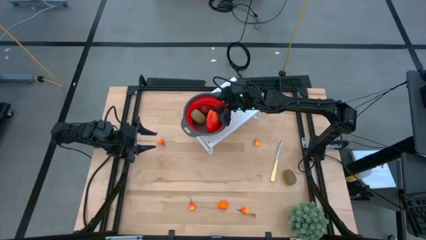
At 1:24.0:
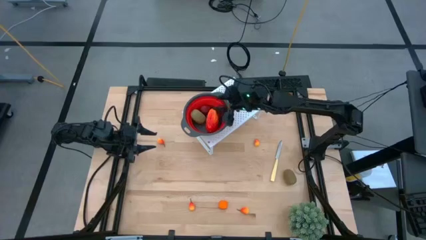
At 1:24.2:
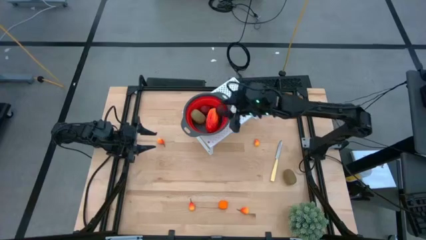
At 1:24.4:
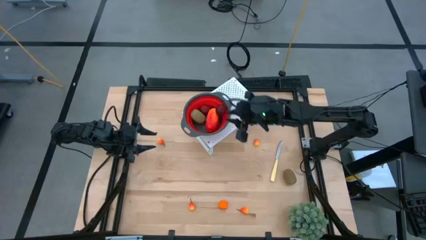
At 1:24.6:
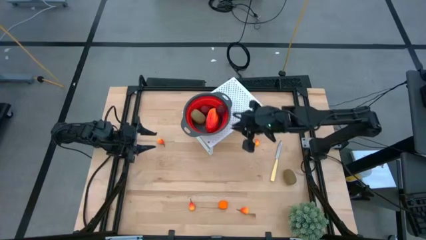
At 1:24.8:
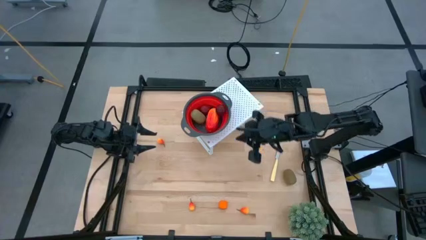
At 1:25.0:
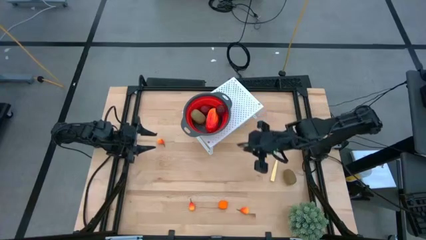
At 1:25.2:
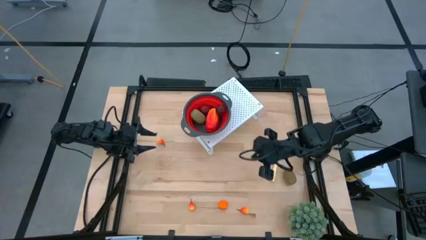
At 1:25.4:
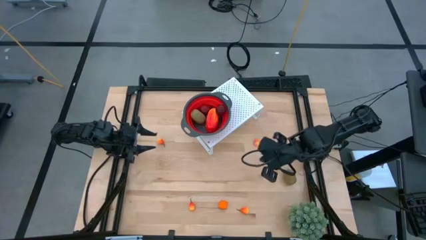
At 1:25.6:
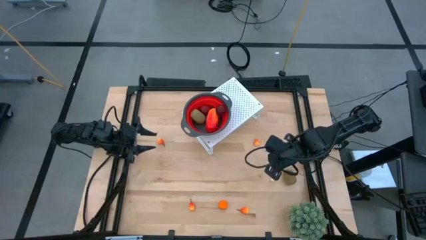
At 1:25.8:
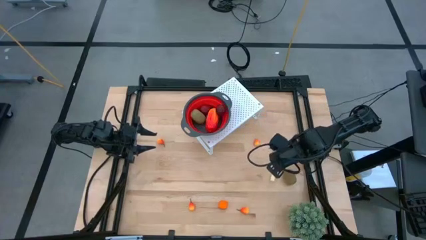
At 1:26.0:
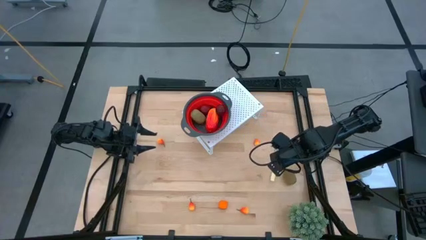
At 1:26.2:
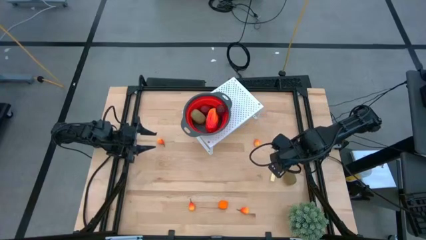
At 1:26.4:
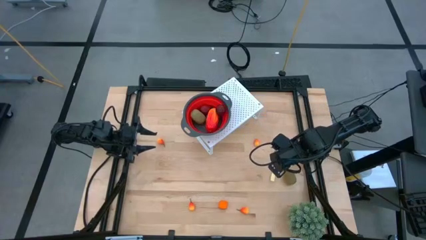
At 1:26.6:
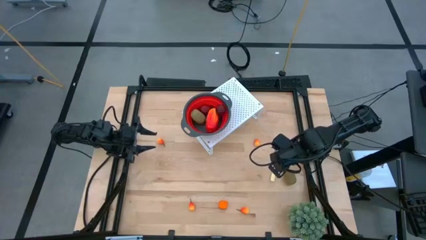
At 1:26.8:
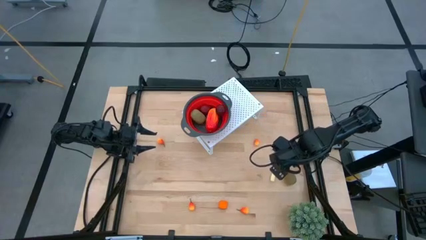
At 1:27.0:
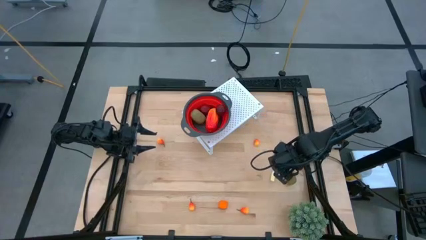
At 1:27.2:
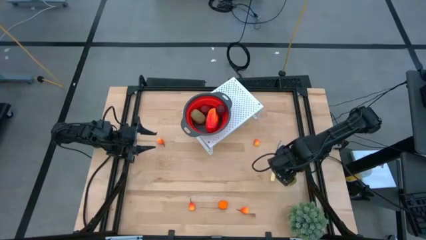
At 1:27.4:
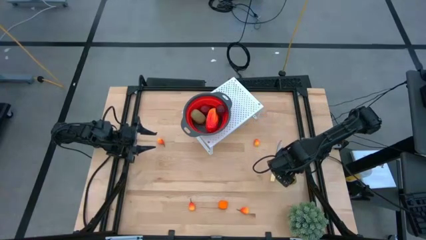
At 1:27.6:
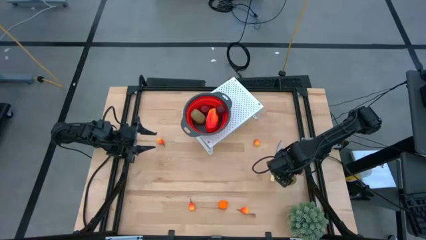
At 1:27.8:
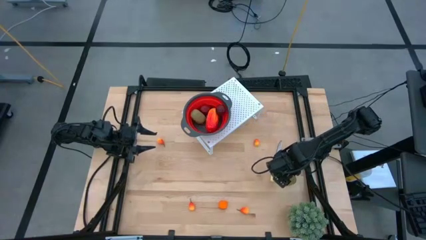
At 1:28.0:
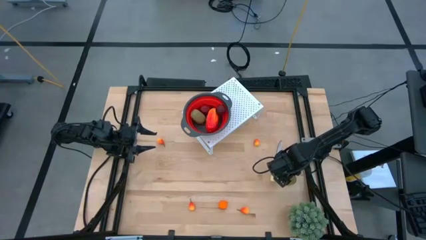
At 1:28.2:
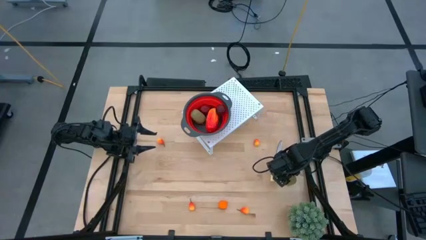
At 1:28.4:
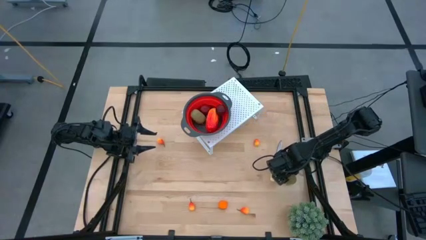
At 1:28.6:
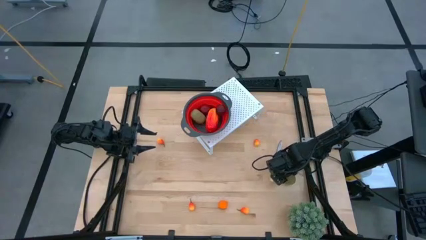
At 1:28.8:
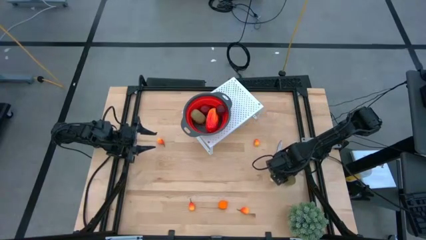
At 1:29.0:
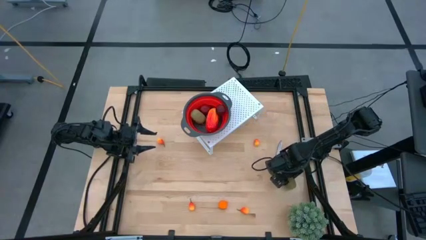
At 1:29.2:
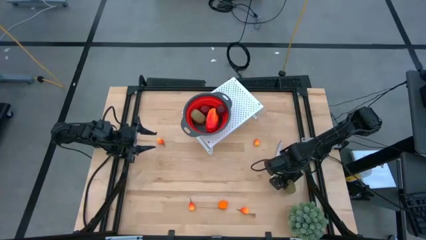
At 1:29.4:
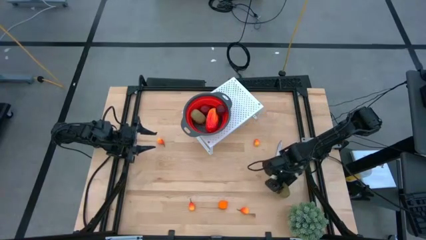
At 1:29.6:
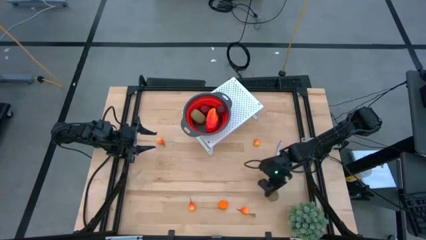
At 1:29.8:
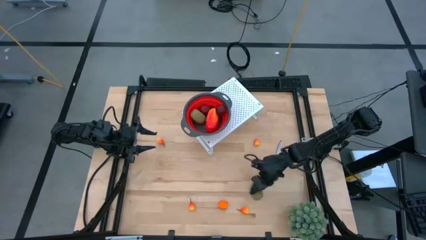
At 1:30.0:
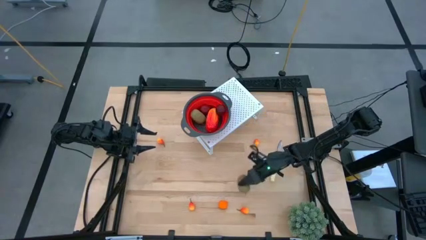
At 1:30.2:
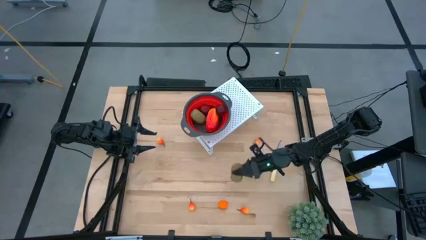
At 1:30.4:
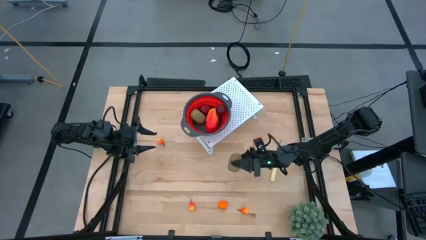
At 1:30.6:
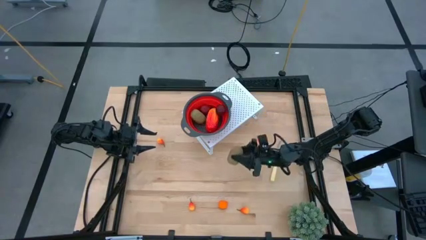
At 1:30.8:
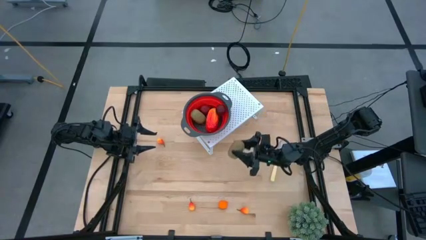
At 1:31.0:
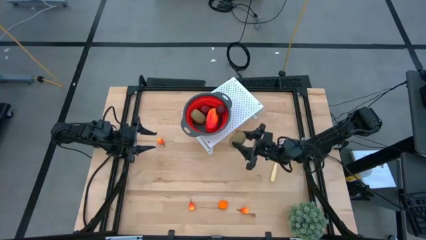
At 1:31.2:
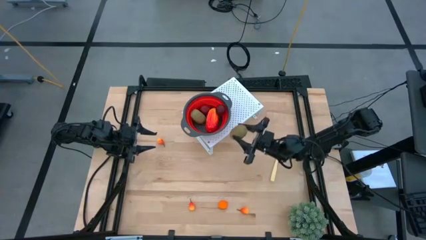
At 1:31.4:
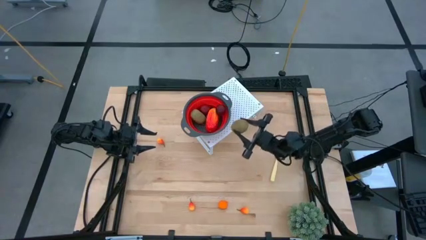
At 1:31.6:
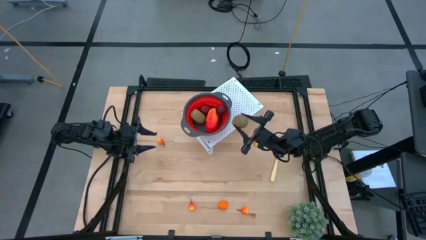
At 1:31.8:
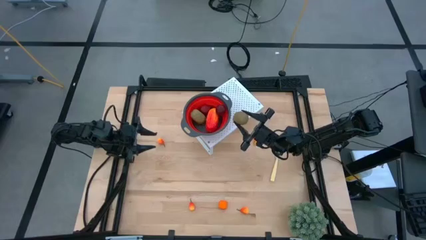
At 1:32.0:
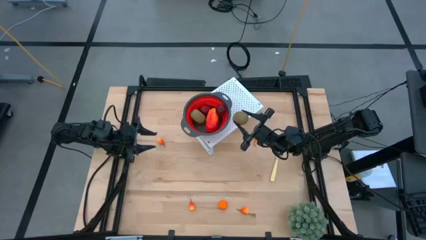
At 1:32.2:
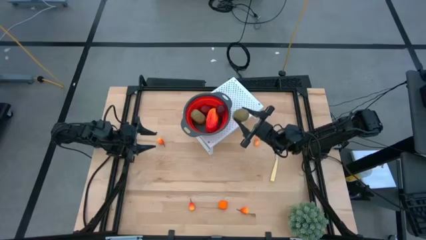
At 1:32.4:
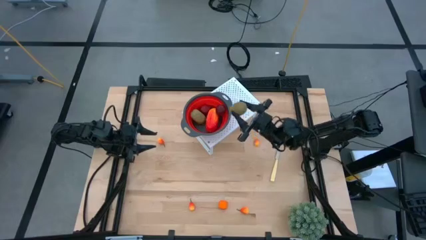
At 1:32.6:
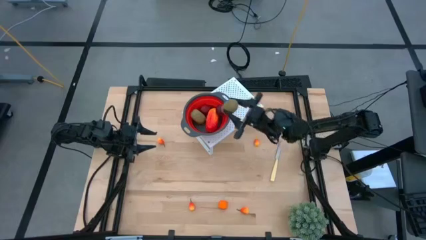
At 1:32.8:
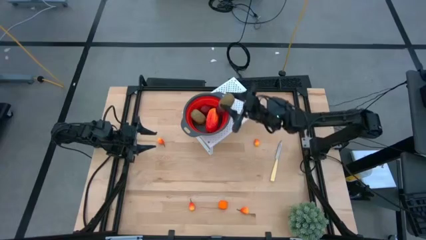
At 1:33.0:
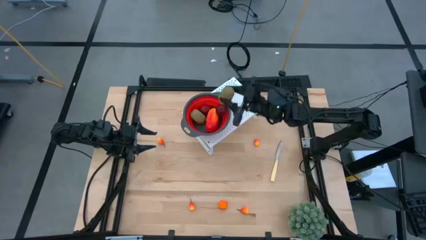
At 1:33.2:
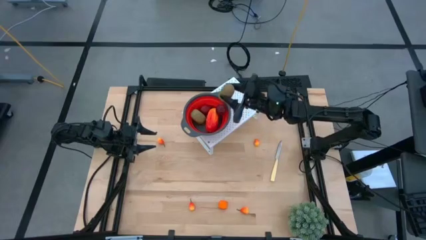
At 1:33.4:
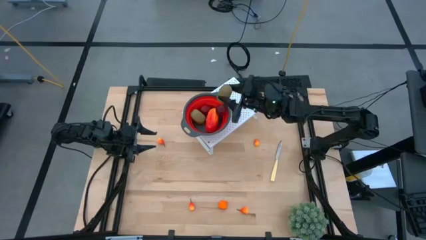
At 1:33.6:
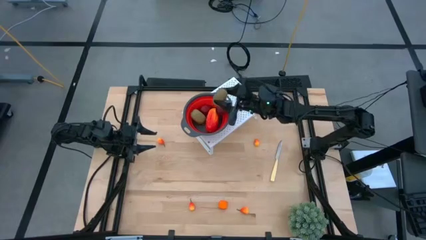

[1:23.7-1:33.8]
Task: Pick & Place Fruit
Put the kiwi into the red strainer bowl on the shelf

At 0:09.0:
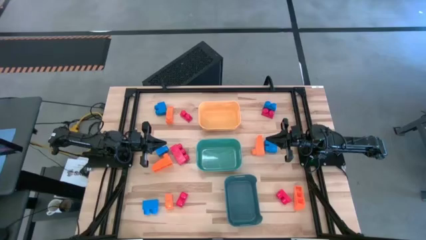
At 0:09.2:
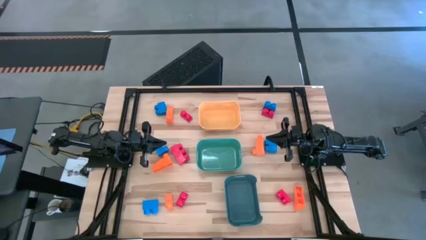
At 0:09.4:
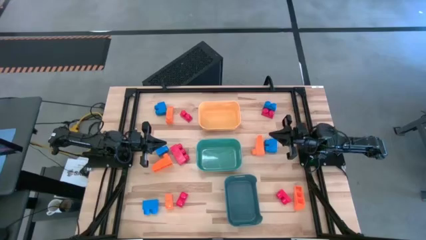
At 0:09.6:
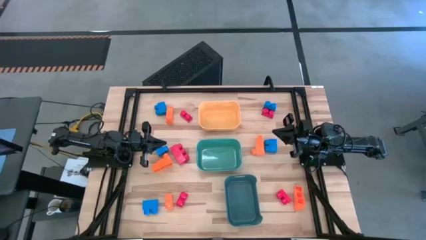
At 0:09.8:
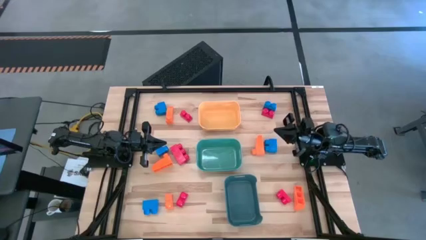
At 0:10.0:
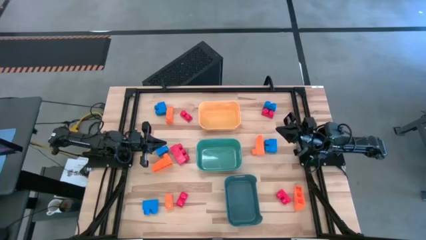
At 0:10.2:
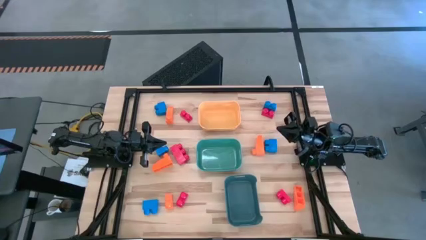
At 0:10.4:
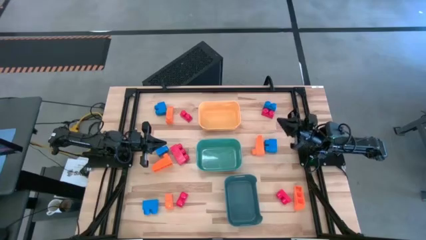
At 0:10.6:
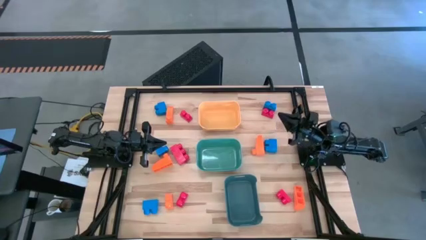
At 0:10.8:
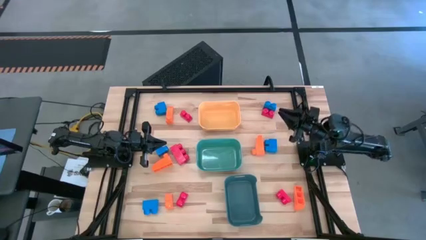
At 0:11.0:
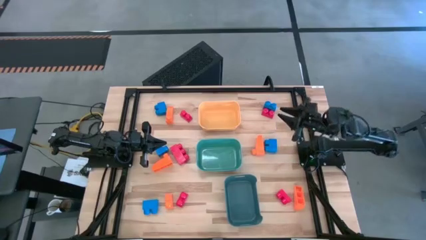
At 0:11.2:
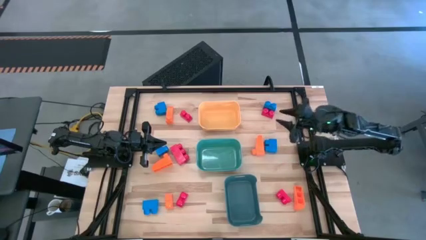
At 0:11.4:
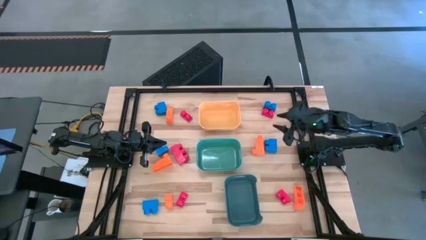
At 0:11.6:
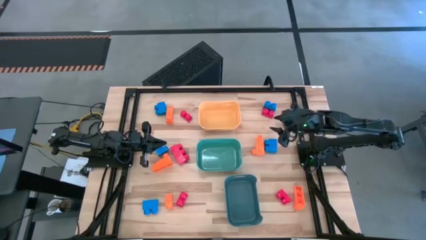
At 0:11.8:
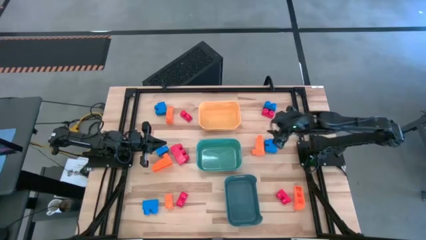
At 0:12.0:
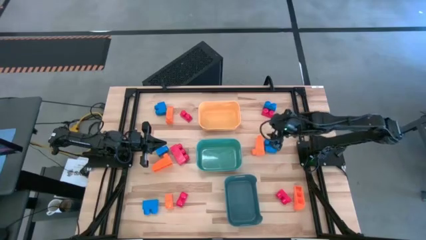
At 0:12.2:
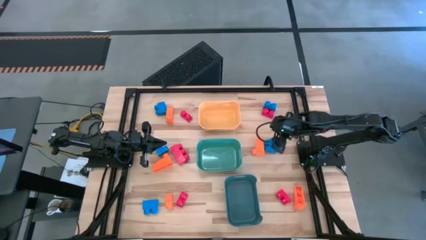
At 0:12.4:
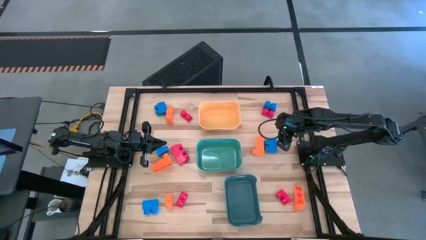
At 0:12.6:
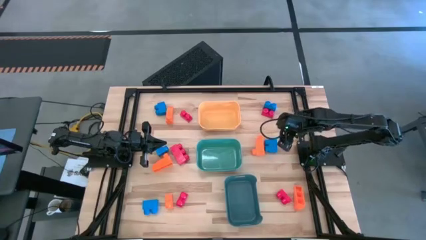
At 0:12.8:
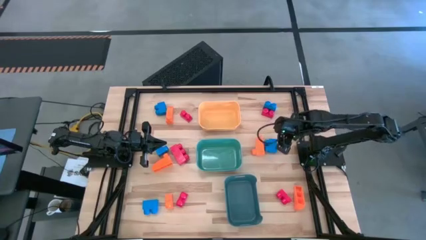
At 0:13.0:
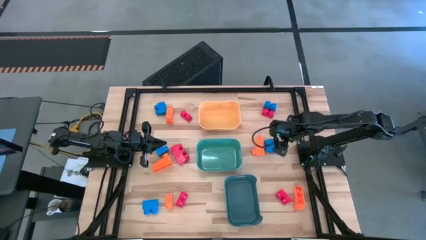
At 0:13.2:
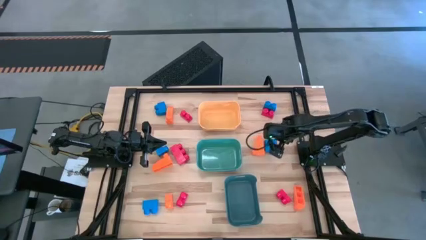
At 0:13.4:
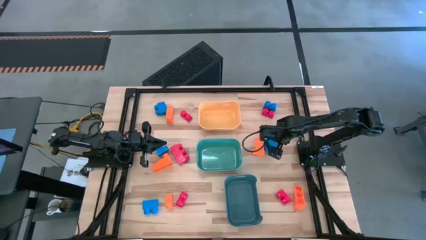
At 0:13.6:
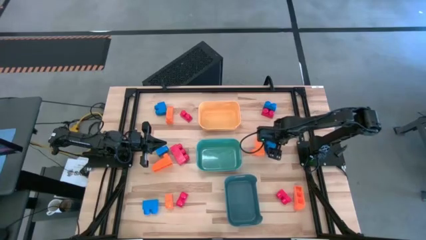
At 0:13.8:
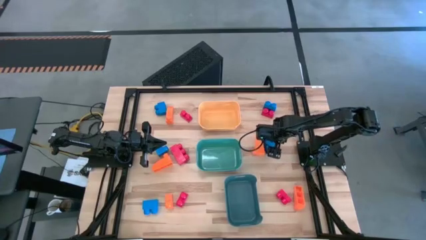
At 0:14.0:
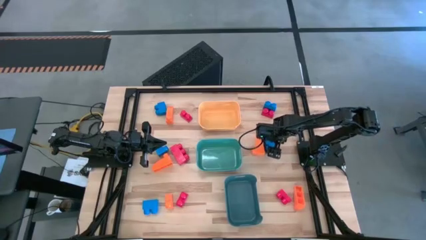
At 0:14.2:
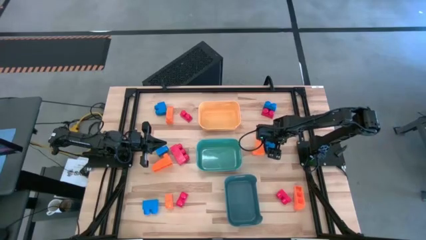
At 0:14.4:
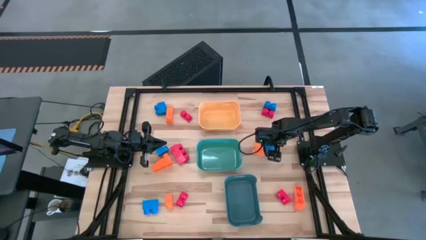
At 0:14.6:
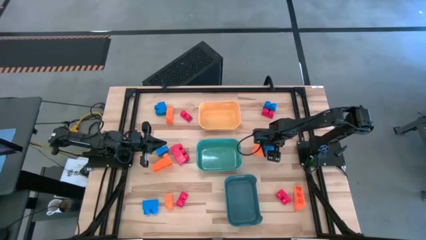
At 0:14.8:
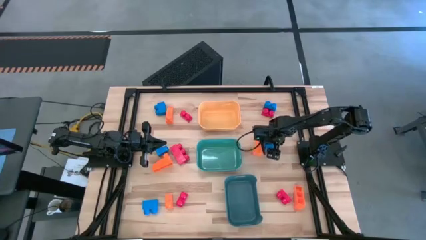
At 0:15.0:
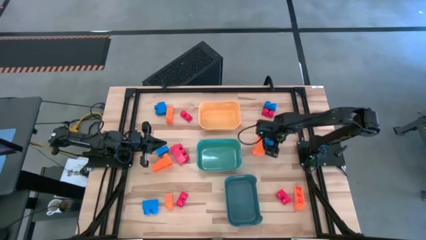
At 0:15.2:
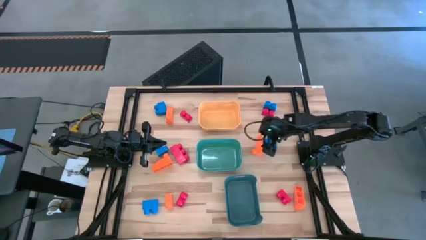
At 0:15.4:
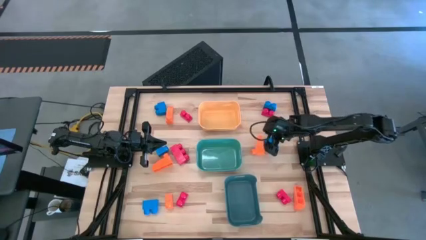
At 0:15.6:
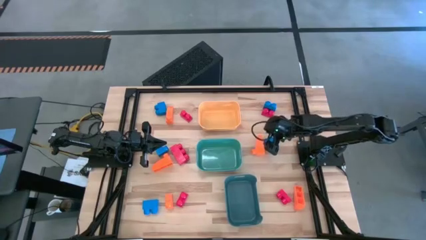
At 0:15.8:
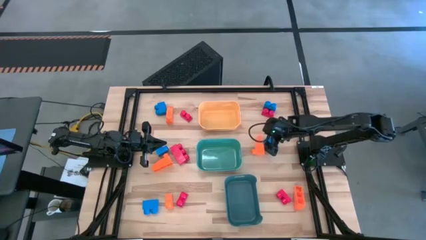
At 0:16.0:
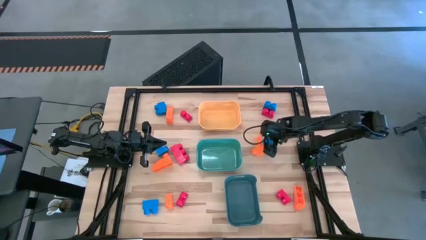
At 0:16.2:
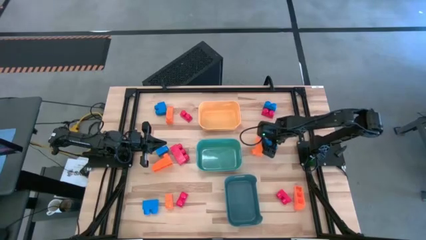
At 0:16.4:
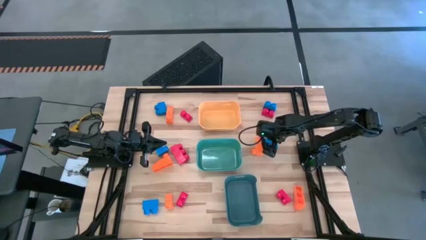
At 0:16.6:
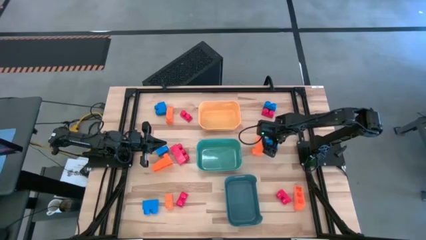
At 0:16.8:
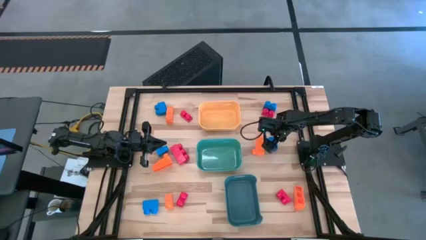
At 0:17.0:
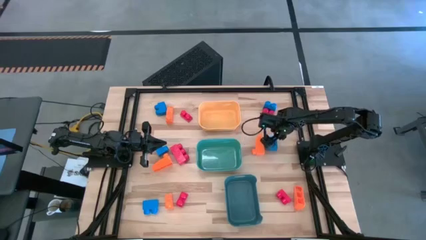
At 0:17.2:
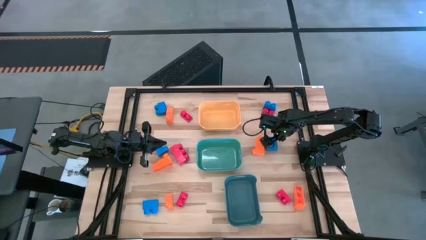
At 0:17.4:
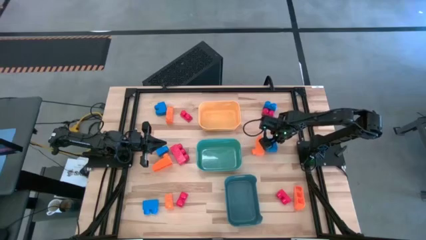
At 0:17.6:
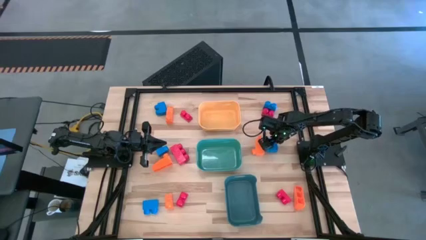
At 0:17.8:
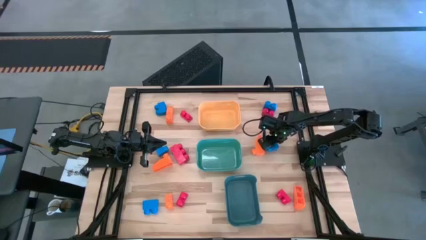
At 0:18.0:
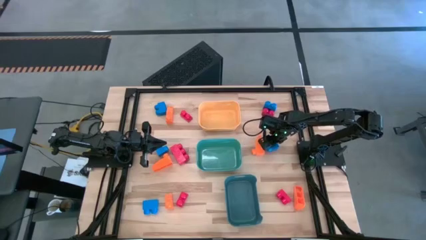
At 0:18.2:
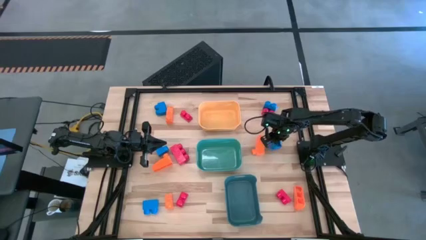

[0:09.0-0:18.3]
Task: Sort & place blocks by color
Put the blue game piece into the green bin
